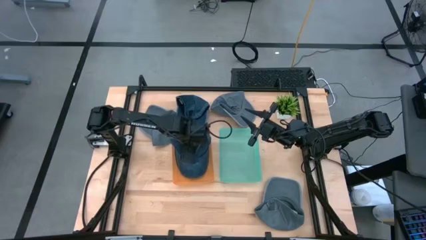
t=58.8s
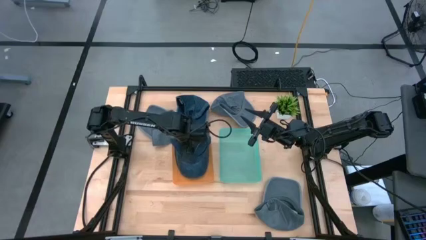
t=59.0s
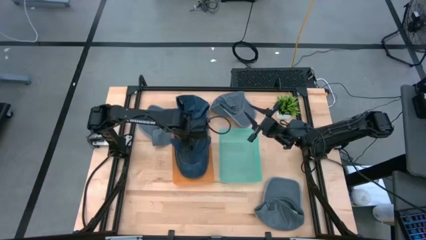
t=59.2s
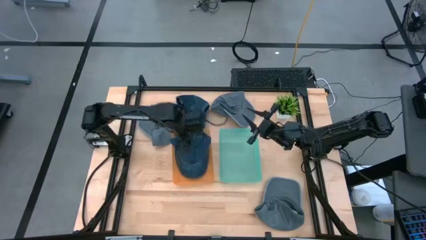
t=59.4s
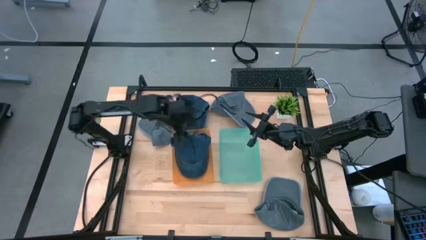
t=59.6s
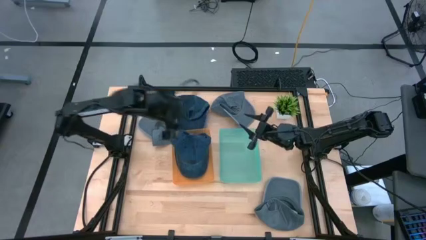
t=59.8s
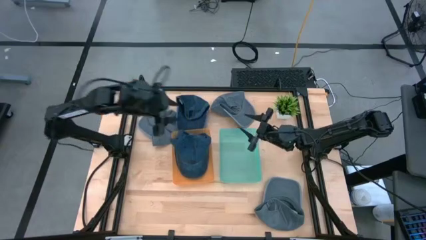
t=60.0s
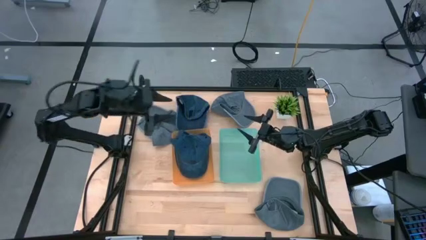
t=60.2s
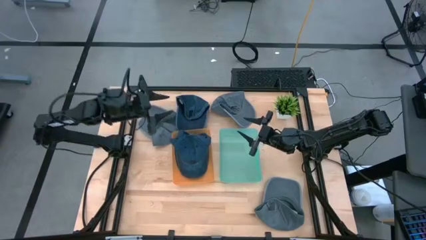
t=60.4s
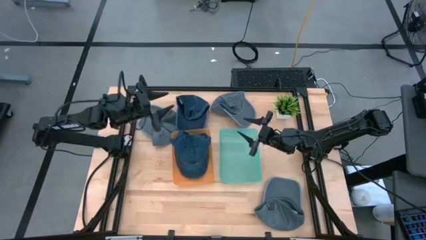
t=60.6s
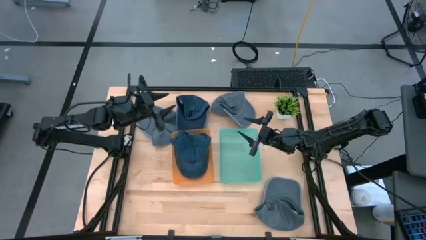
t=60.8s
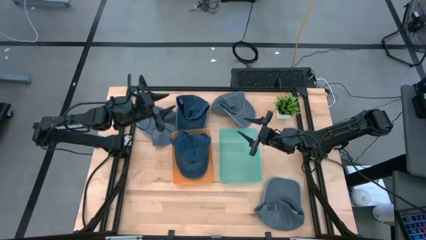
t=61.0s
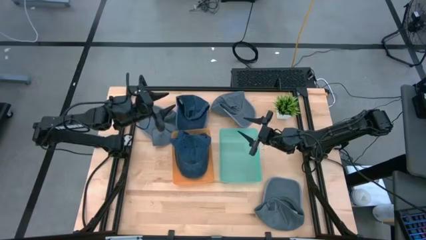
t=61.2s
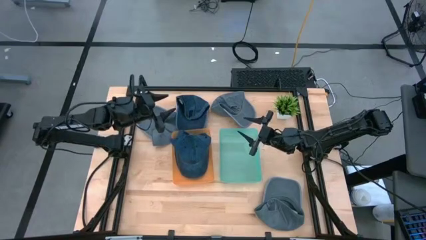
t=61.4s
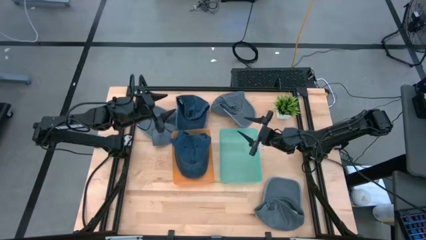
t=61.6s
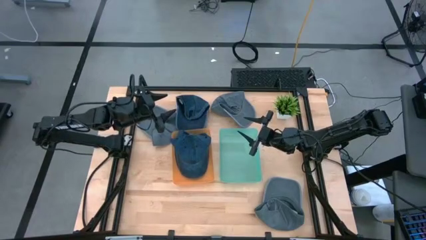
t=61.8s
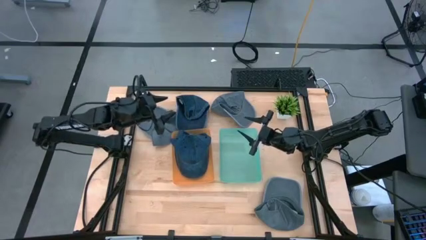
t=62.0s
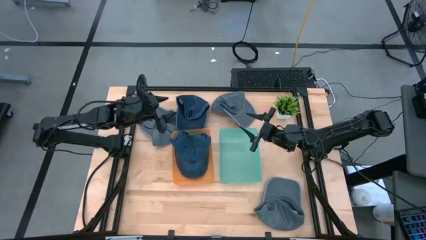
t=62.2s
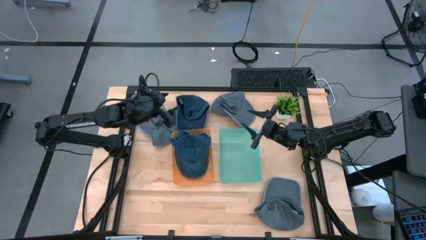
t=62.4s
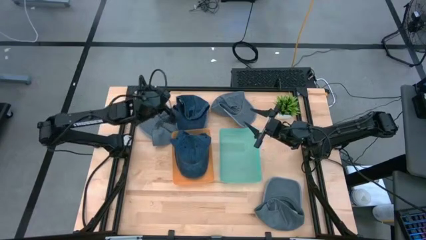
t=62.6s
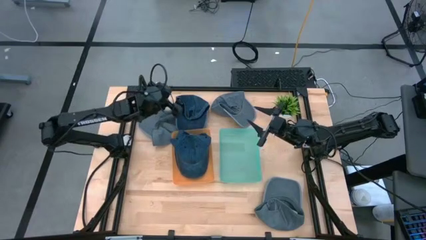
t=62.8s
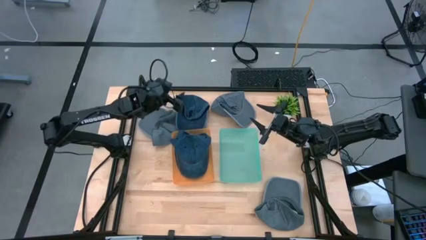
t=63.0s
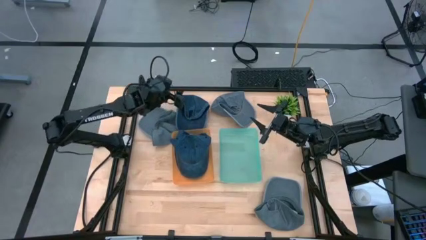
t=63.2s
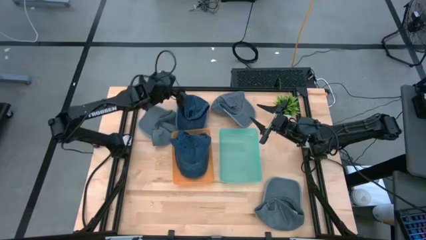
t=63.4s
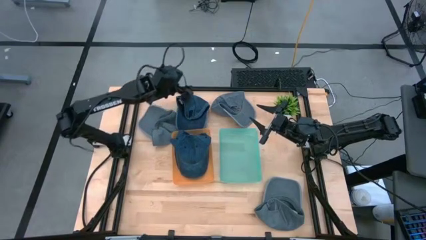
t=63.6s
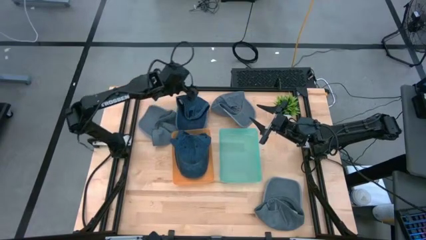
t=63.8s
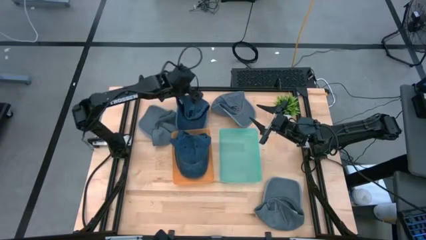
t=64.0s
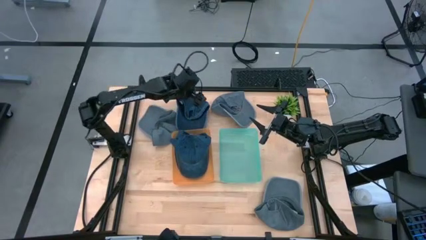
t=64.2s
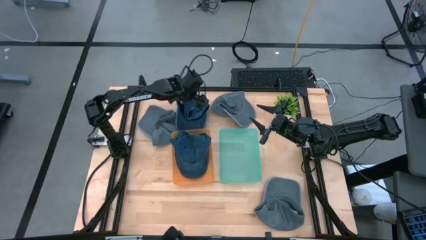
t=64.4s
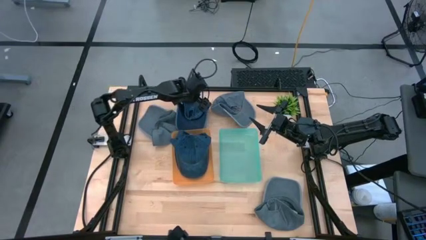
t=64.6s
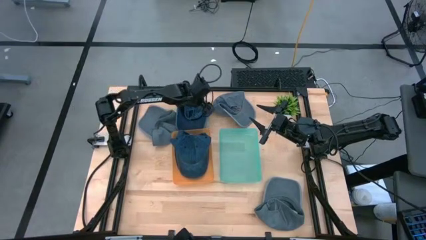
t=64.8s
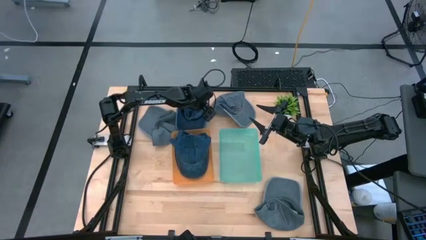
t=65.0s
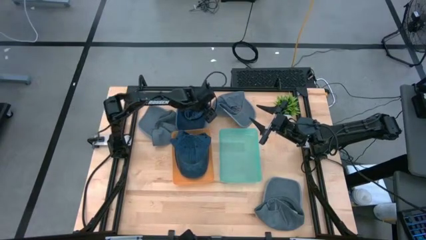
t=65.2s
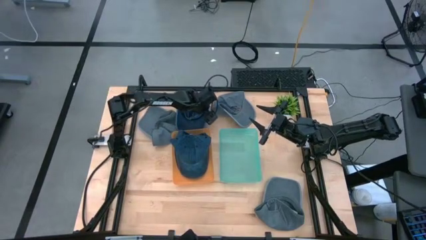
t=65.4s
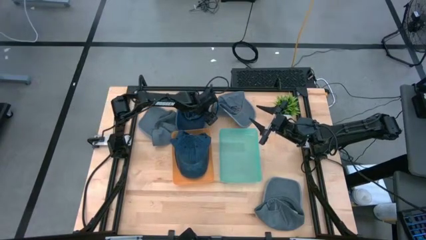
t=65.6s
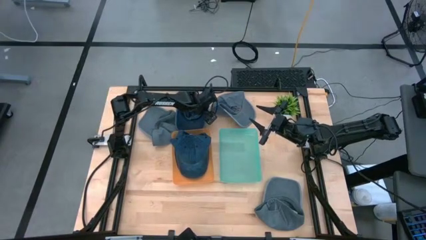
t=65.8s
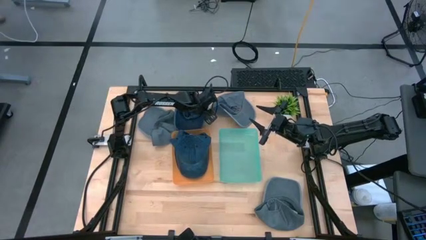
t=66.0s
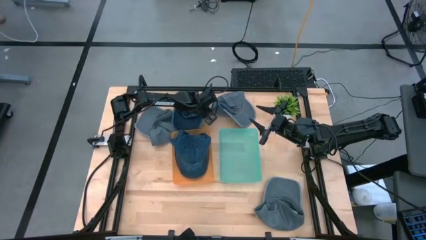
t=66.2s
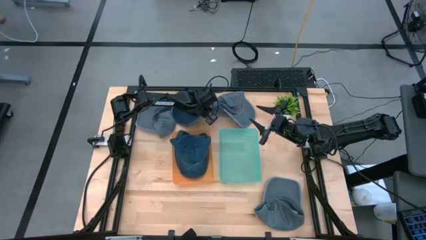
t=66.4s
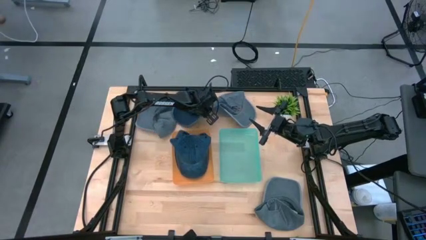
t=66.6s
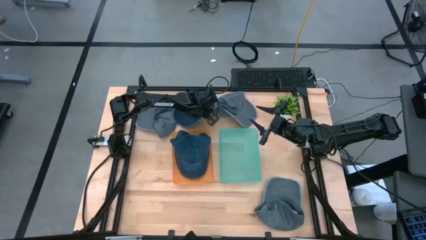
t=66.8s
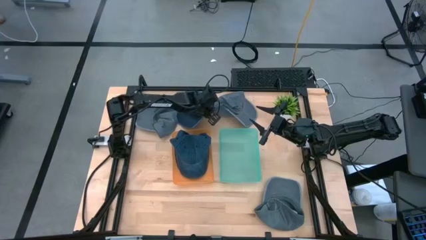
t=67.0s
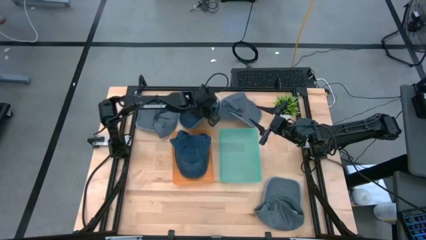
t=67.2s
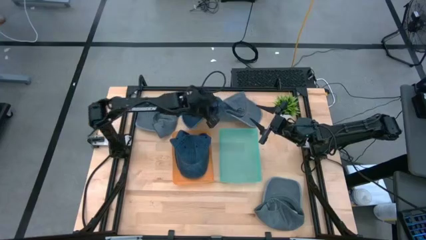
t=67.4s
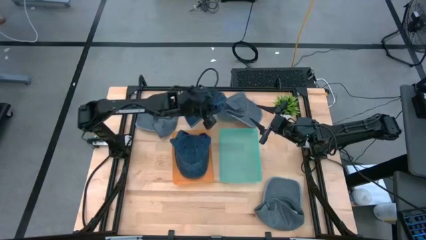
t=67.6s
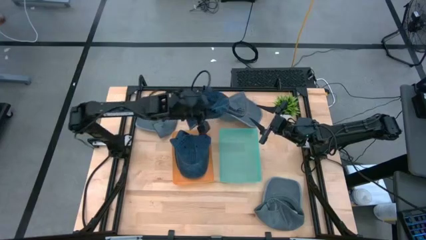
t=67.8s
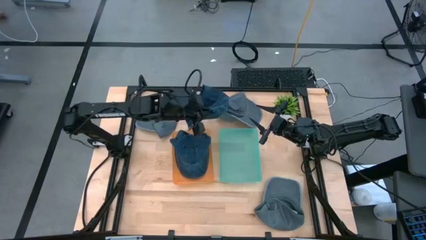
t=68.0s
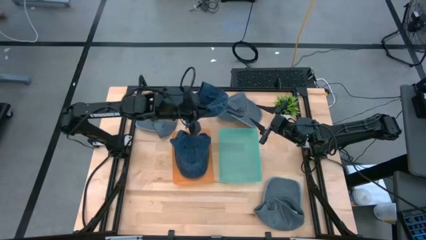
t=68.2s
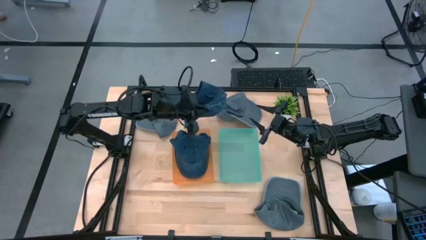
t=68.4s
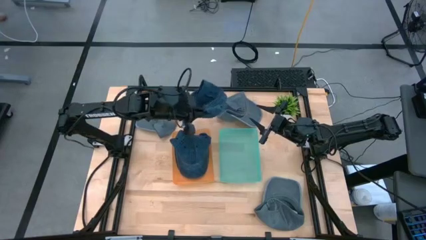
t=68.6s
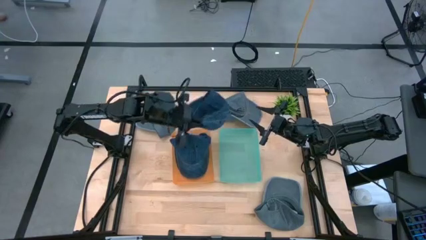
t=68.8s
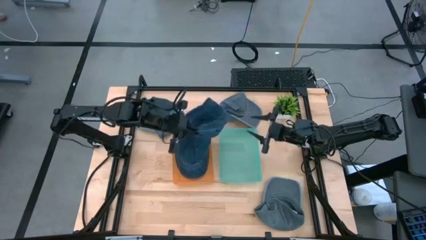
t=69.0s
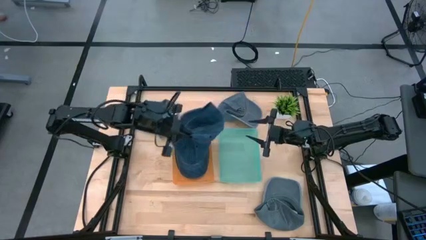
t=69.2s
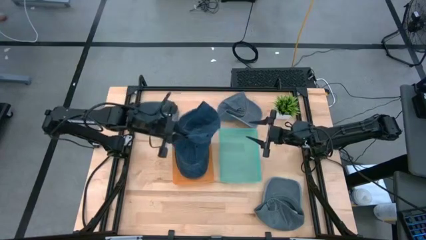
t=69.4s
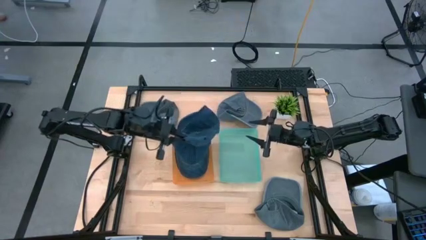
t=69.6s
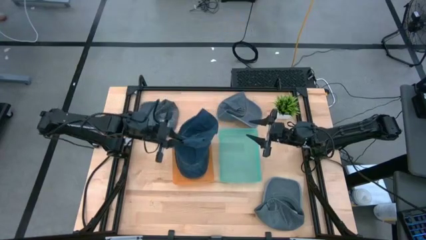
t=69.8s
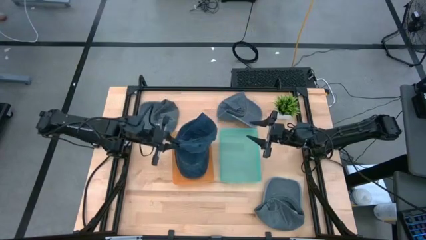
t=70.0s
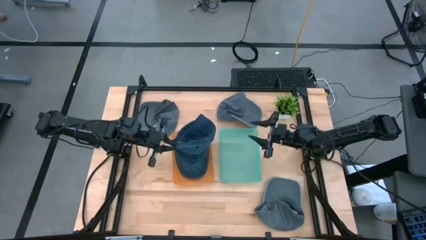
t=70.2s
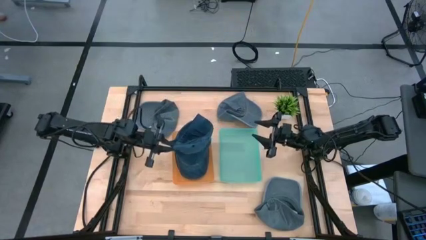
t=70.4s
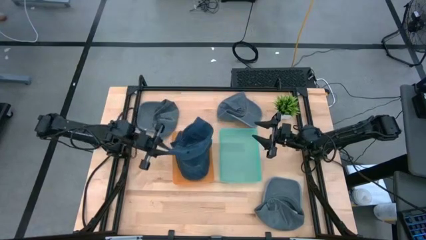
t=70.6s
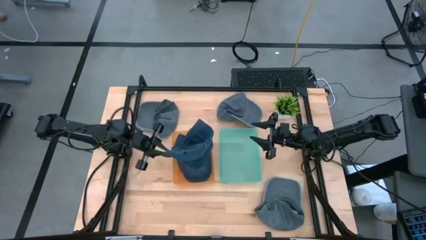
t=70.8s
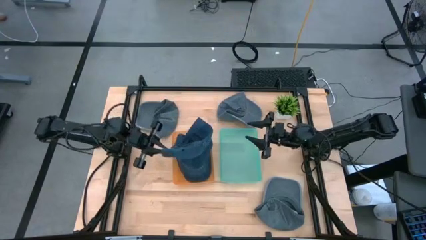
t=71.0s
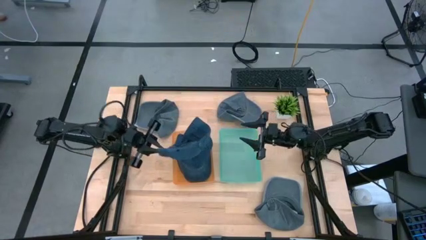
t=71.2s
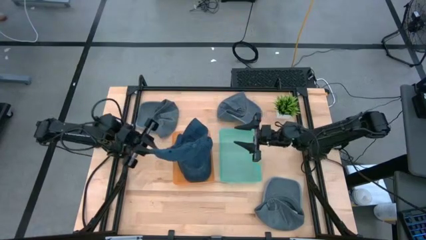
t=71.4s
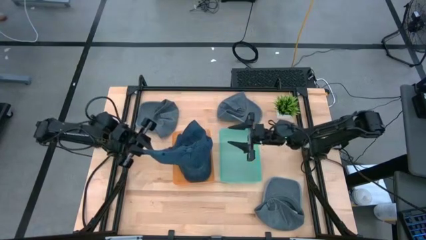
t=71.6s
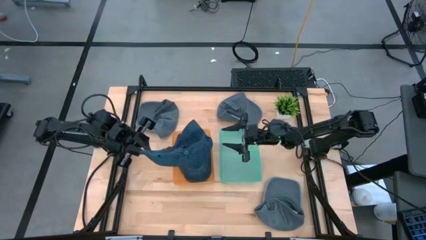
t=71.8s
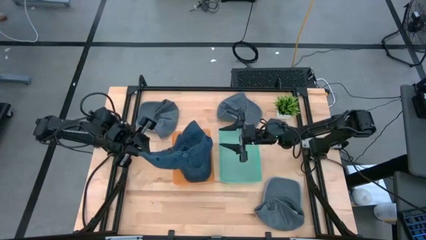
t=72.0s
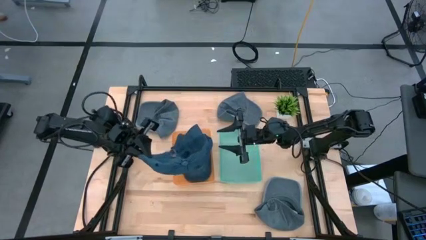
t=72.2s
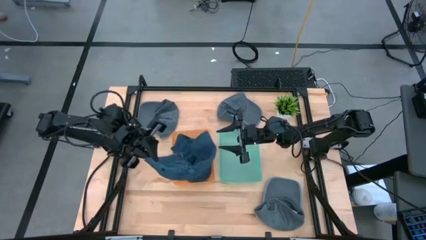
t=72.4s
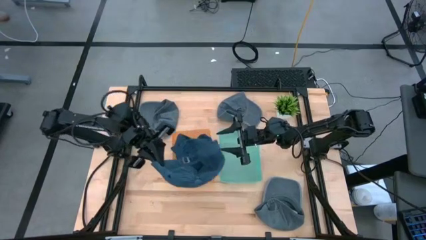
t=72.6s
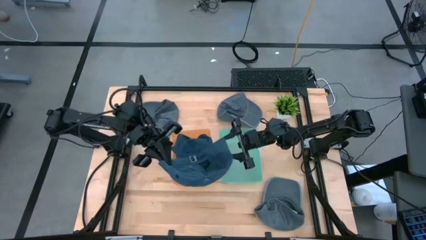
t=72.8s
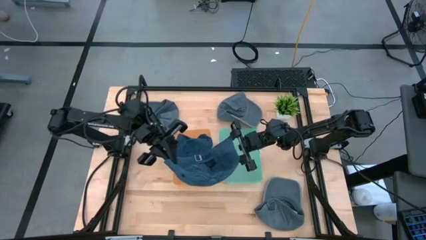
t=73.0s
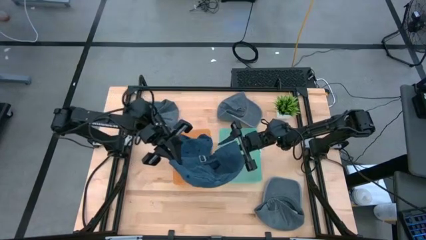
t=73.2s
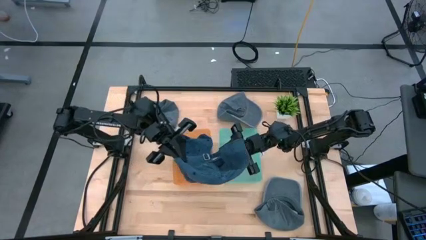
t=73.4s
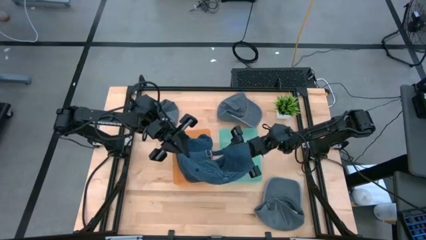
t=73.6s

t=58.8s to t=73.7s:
Task: Pick & Place hat
Put the blue cap into the orange bin

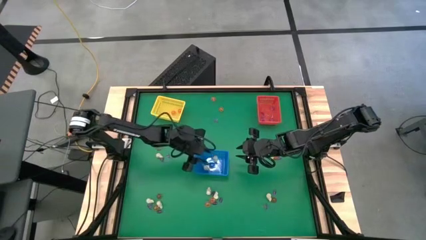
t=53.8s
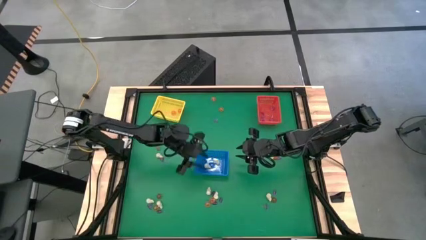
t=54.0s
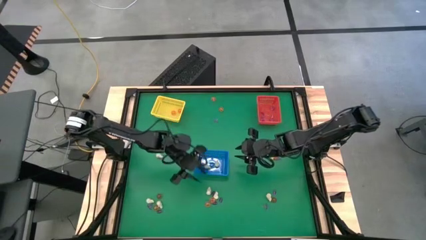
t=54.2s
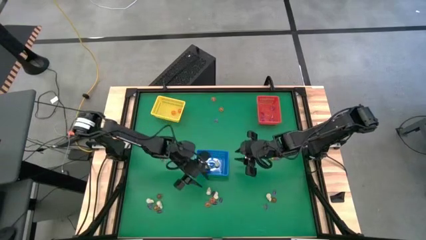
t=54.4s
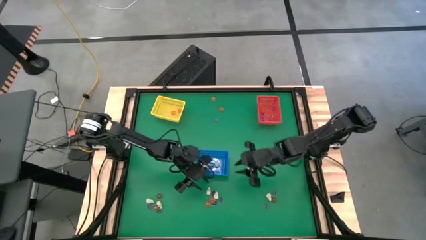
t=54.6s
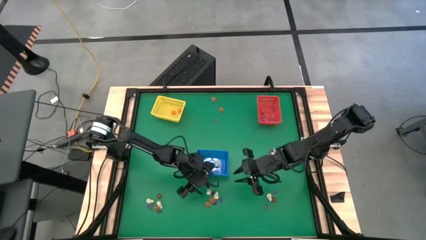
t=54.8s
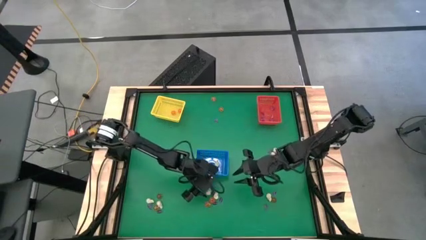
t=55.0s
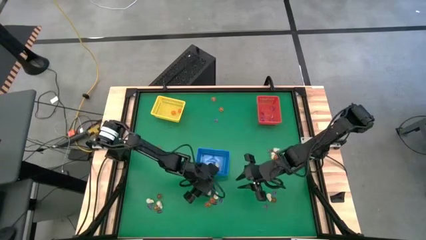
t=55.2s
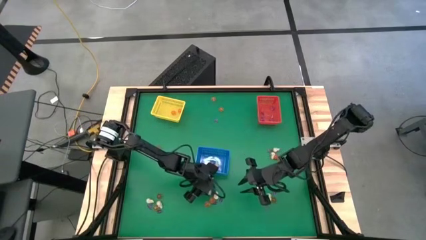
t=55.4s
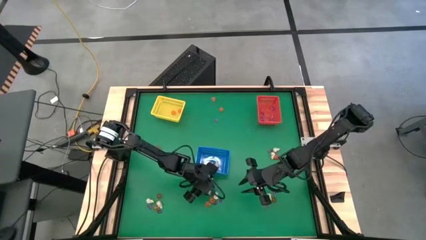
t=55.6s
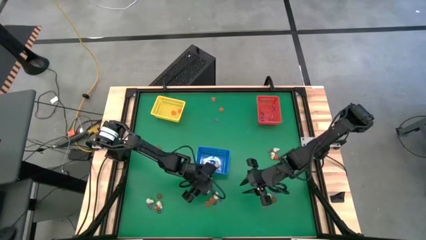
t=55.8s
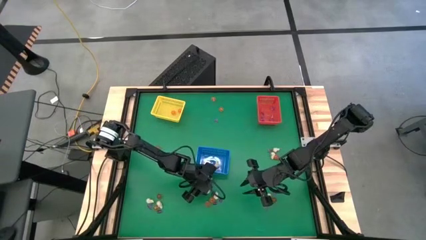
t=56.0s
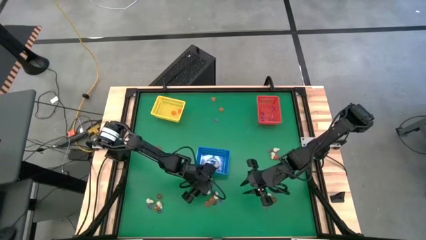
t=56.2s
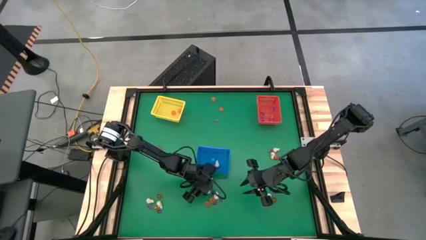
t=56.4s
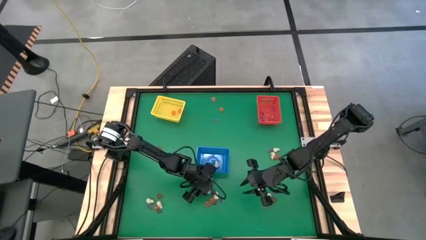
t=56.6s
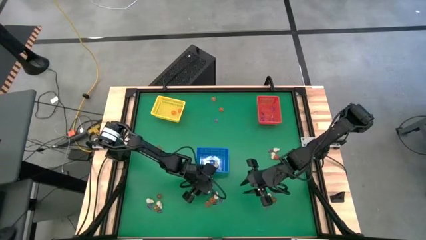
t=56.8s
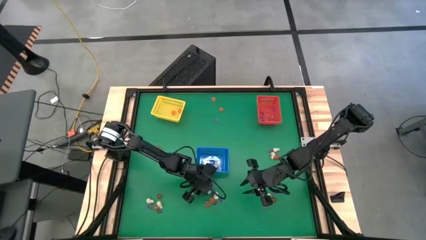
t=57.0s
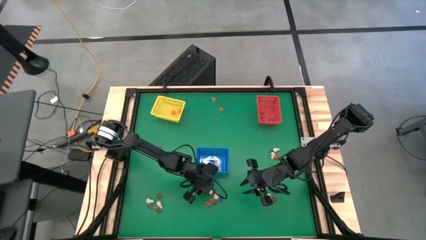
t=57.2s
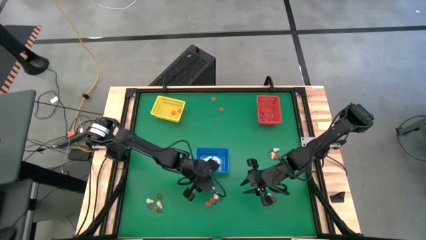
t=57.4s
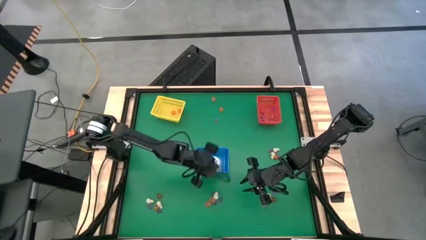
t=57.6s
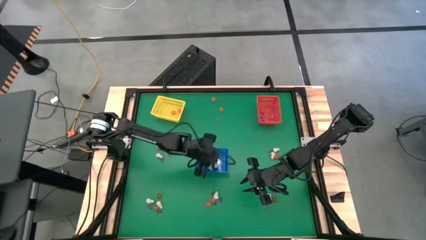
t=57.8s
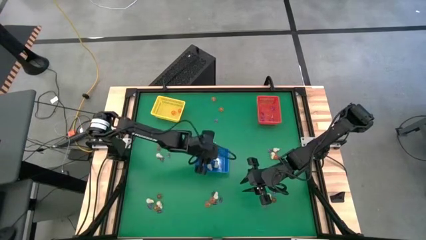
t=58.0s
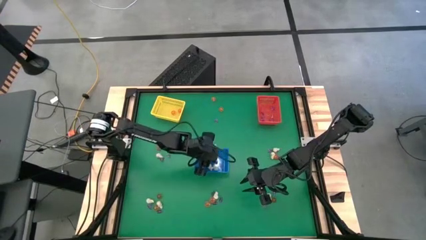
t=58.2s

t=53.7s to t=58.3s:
Task: Sort Halloween decoration
Put the white skull toy into the blue bin
